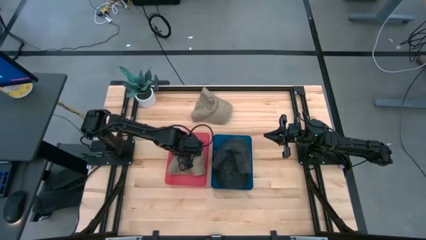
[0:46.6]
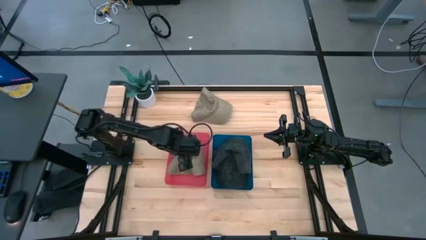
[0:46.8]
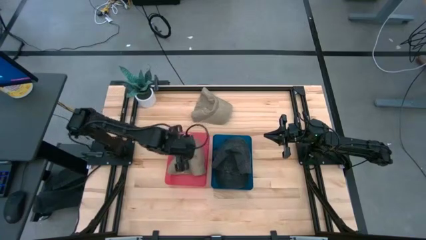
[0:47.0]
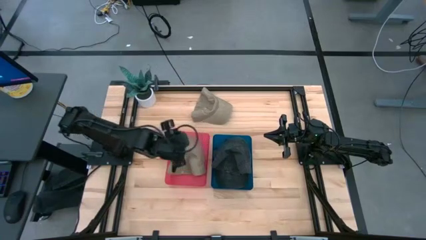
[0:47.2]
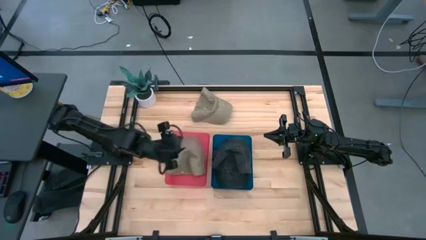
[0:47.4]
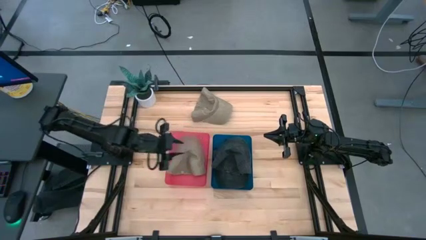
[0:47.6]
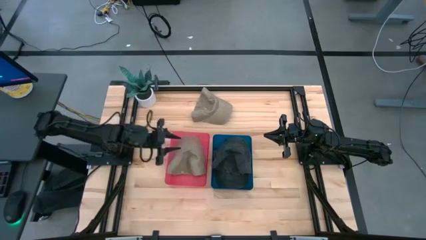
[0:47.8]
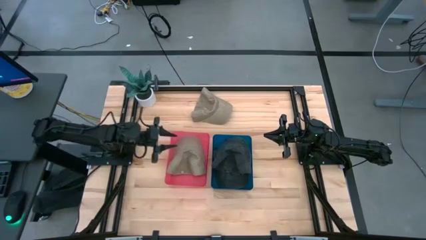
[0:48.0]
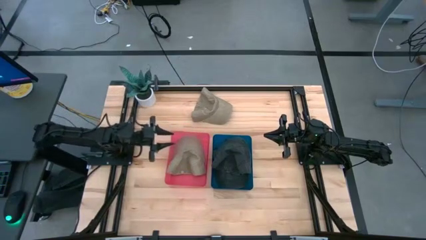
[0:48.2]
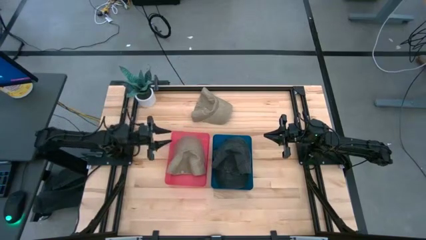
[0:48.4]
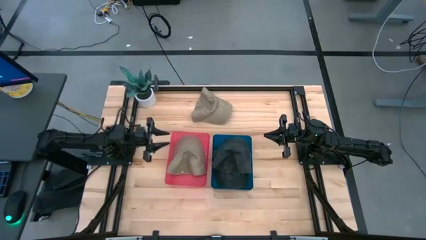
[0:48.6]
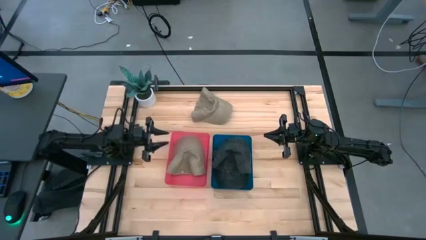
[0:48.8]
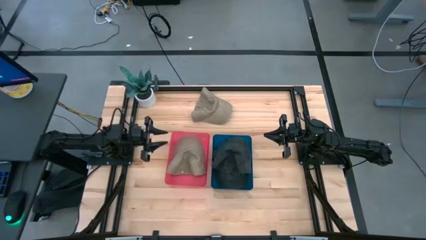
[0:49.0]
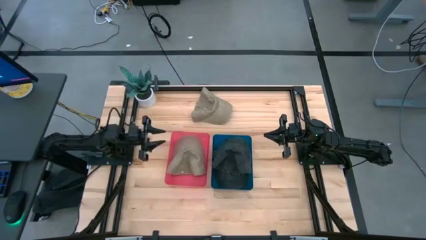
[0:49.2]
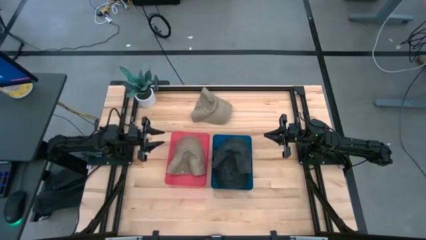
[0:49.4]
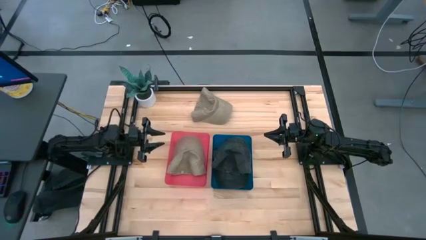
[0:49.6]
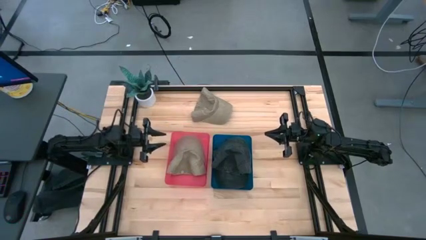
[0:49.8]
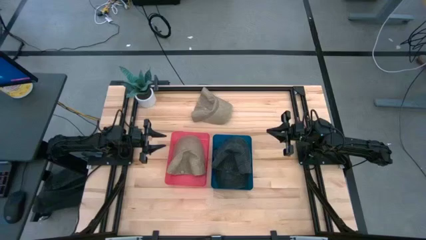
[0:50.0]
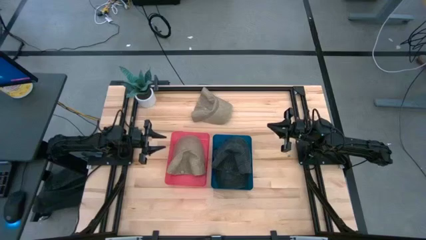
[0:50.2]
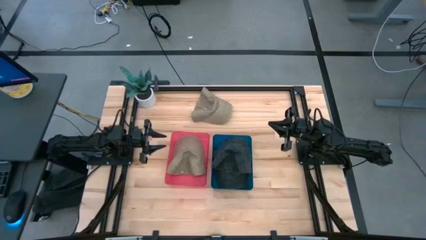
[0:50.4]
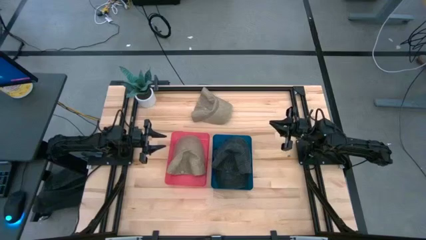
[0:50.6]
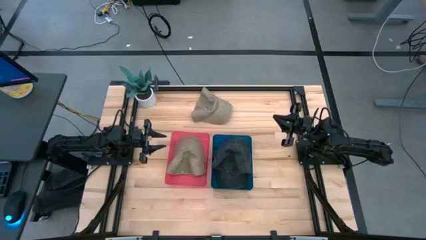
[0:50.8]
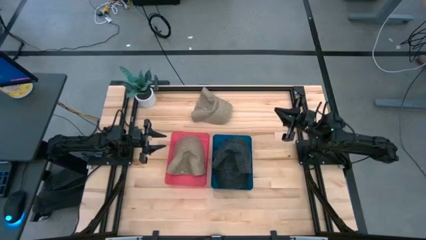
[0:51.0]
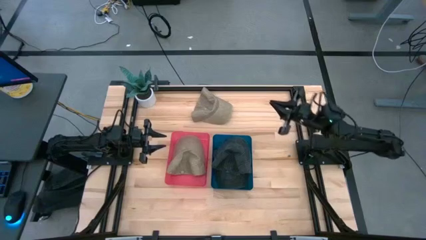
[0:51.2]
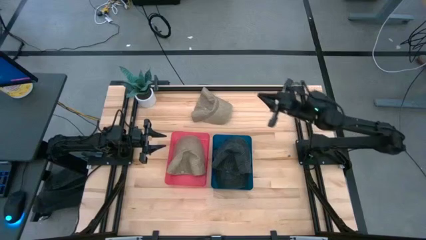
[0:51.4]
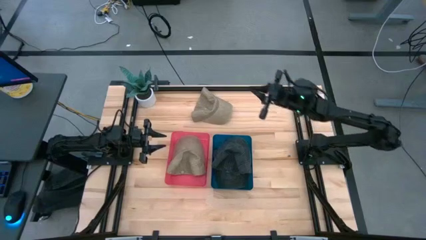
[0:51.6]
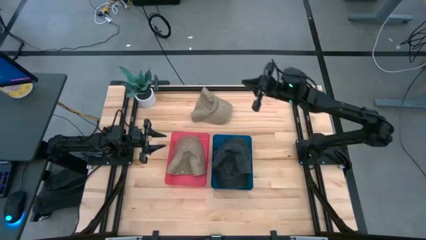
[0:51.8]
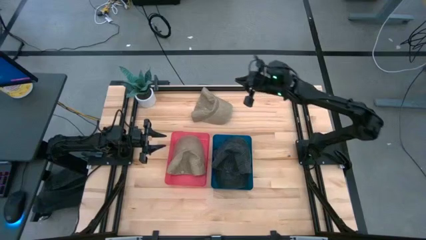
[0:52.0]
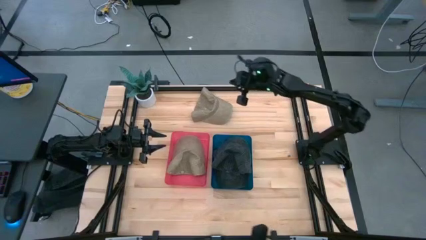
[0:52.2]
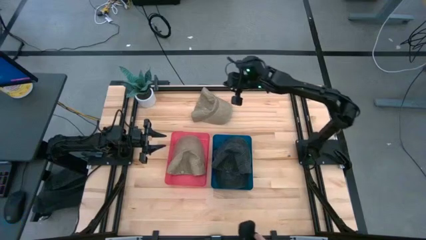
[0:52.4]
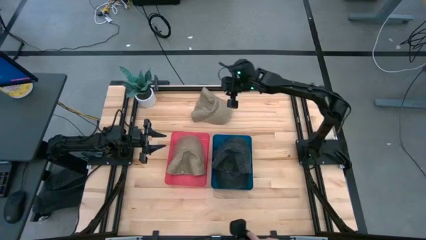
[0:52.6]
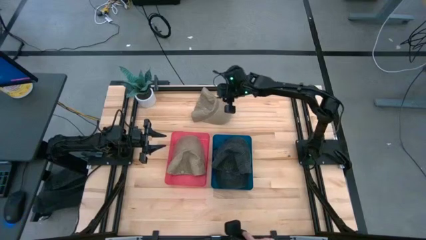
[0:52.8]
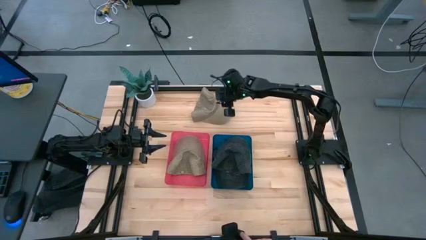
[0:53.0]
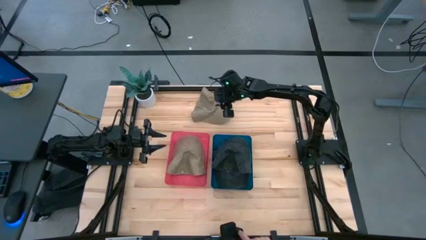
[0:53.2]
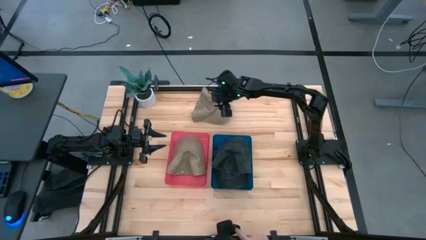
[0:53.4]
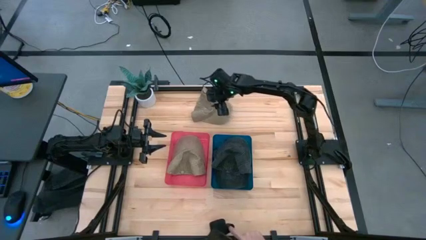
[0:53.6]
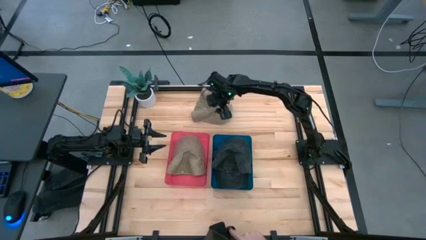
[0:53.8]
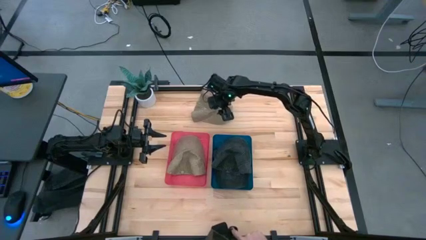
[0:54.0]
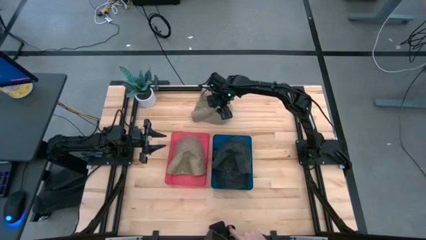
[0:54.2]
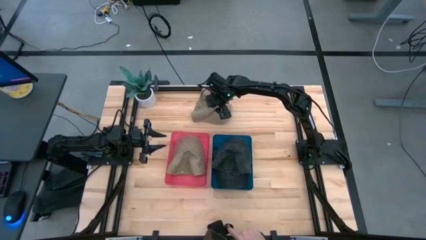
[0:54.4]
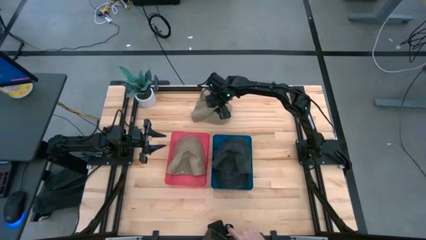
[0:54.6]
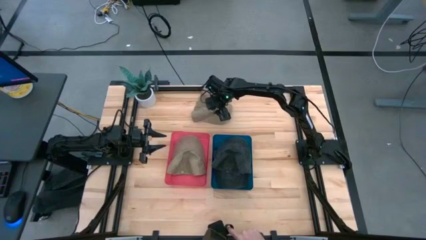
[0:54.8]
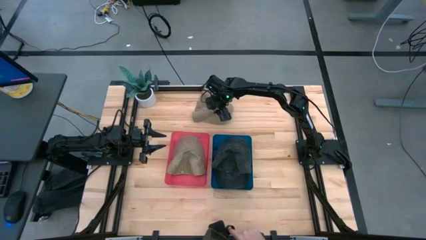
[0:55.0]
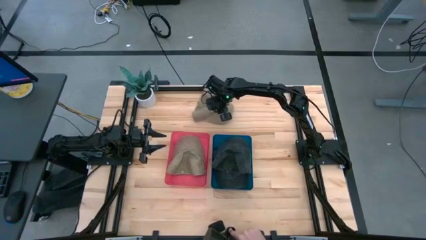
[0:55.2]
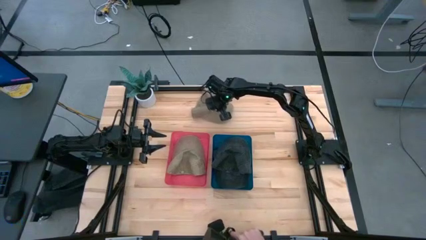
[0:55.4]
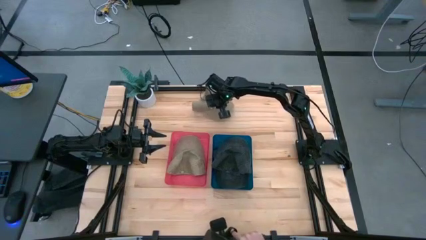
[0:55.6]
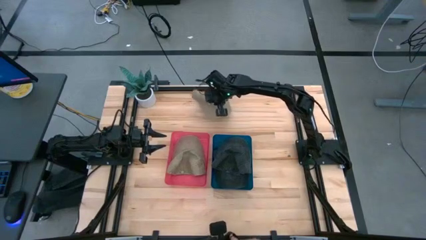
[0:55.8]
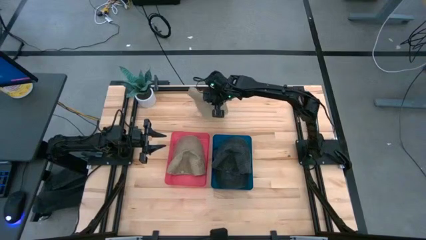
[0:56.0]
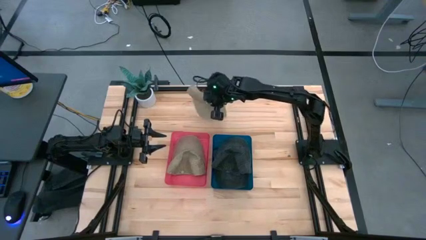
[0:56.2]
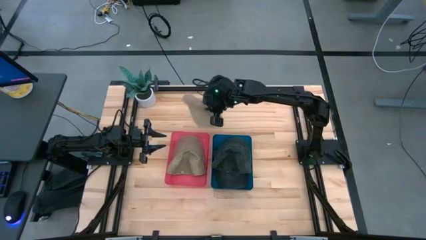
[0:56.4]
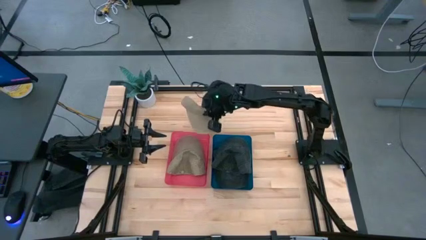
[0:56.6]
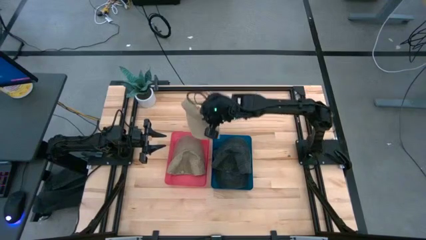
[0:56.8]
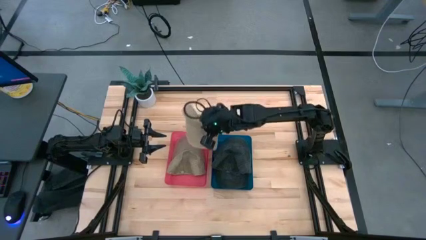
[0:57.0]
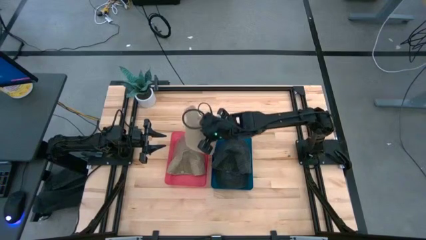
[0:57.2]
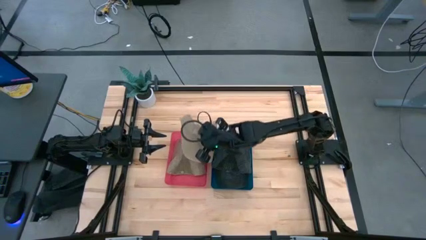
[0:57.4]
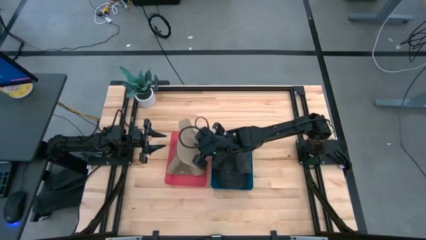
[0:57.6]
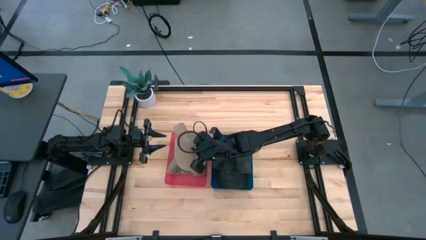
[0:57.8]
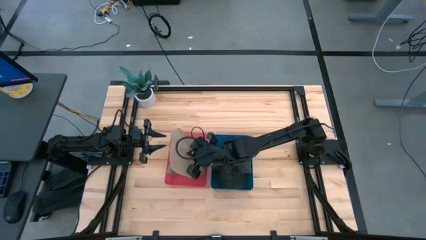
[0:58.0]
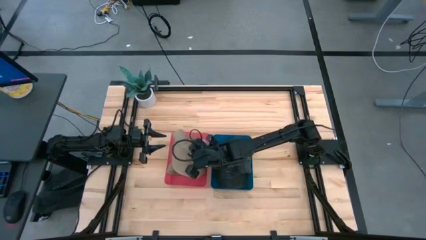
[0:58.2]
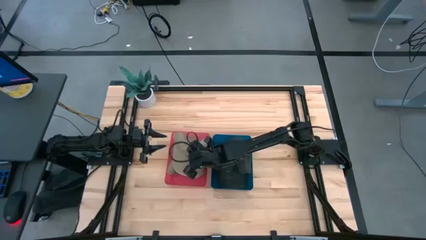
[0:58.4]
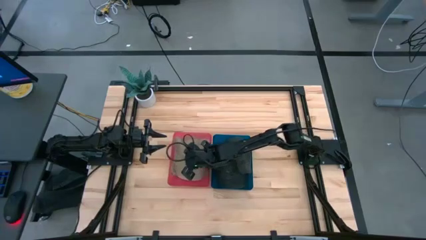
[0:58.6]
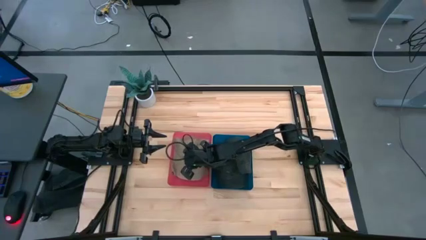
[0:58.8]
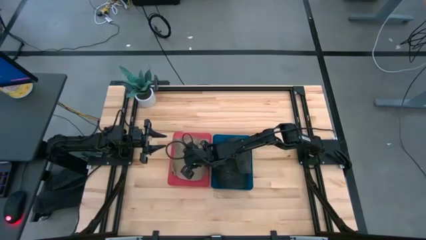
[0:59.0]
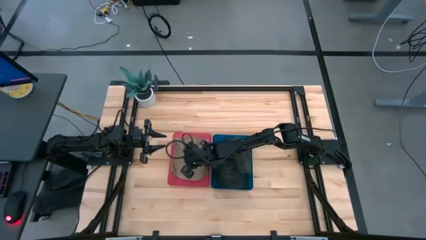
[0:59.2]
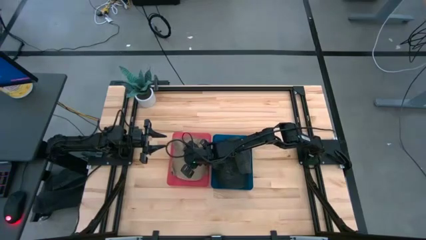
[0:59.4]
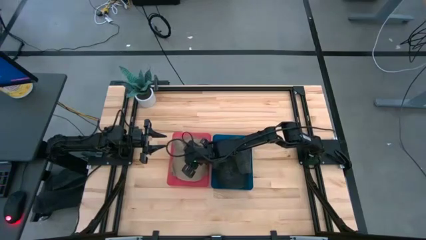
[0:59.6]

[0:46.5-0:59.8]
Task: Pick & Place hat
Put the brown cap into the red bin

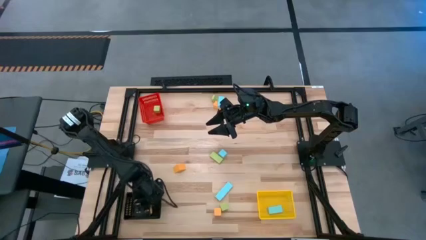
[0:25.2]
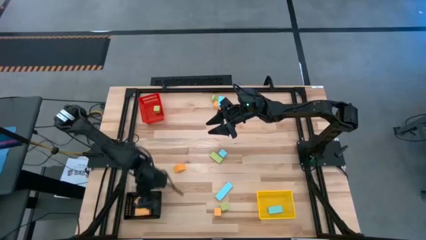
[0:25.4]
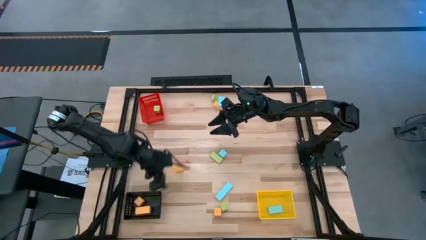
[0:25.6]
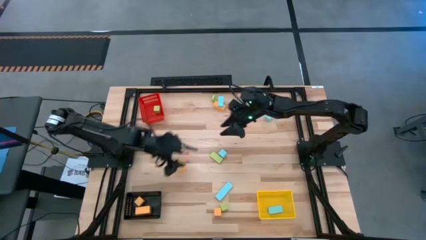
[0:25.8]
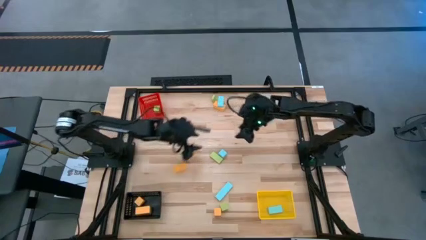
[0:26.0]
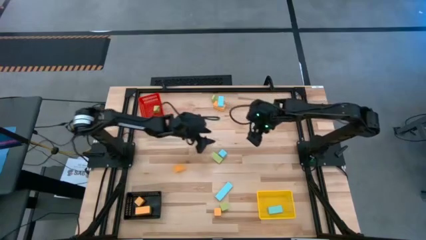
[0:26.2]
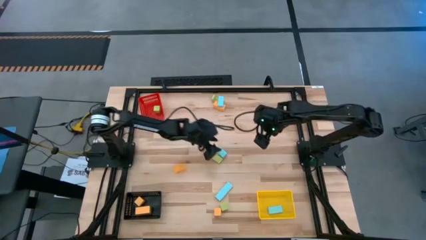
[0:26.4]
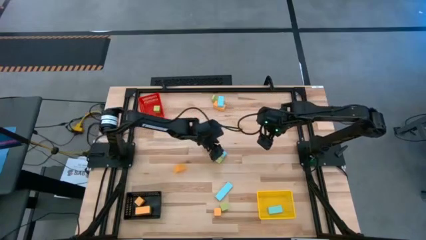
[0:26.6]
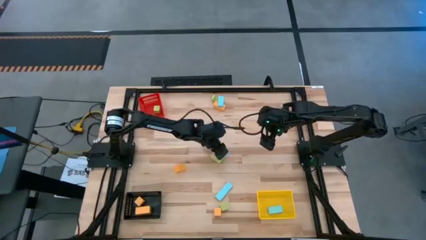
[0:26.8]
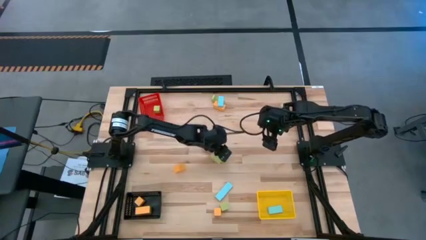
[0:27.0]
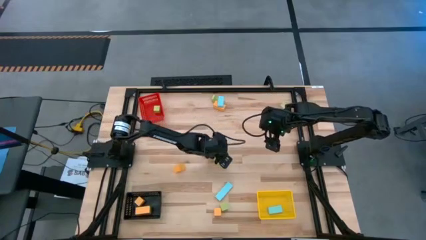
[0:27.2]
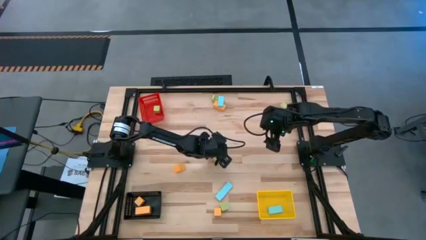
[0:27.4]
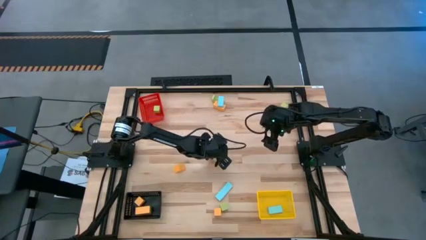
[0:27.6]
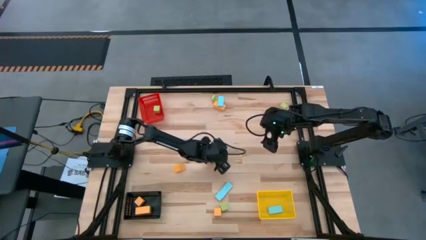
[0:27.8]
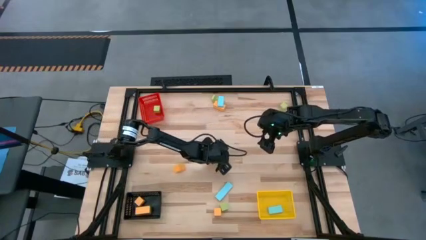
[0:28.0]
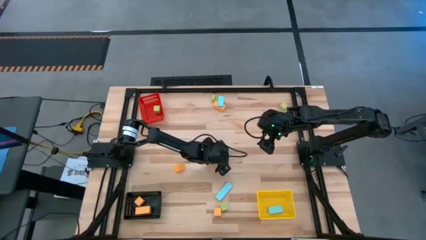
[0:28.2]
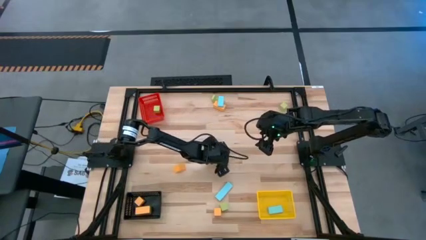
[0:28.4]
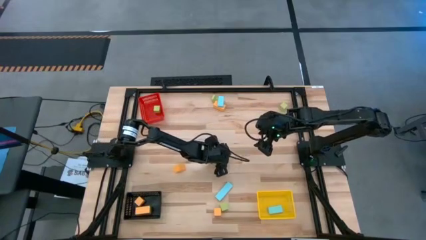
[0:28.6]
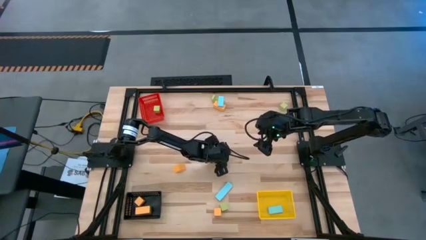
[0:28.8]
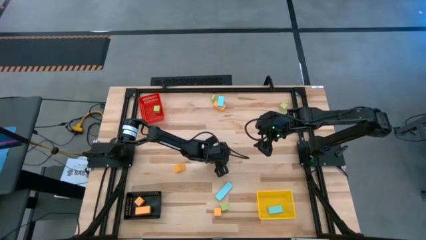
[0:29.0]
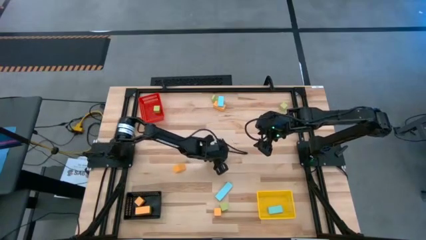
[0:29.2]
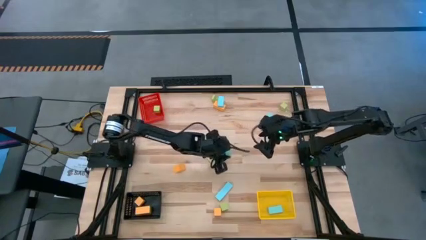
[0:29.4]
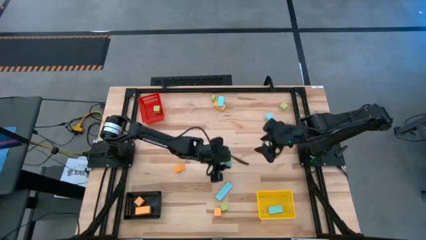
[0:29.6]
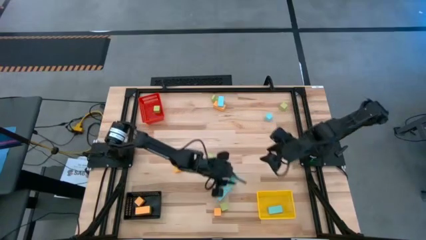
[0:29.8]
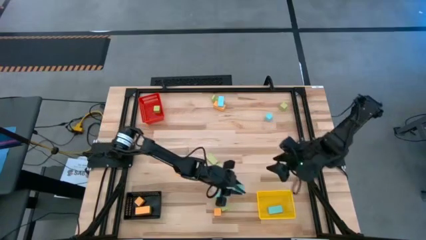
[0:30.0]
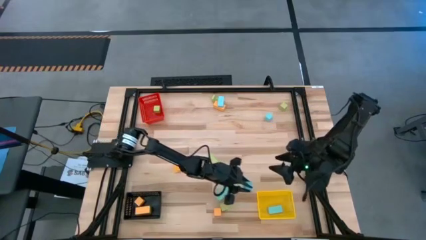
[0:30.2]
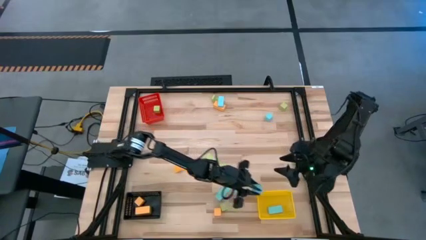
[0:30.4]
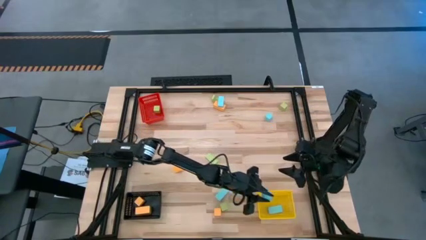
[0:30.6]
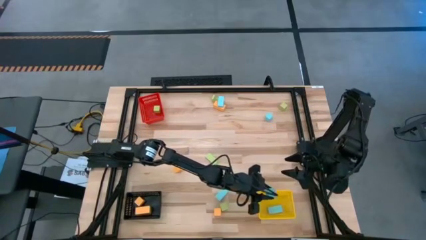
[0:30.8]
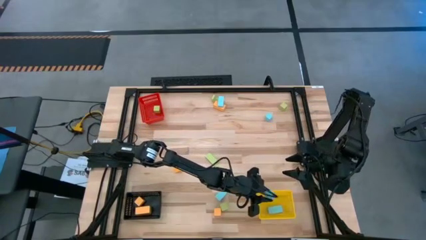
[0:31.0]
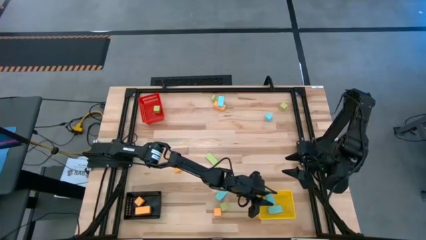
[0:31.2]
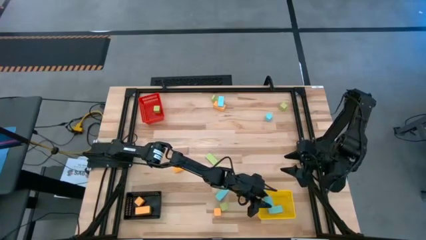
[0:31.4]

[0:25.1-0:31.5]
Task: Sort & place blocks by color
Put the blue block into the yellow bin
